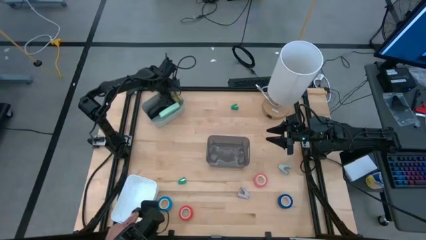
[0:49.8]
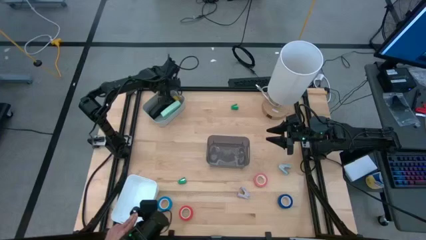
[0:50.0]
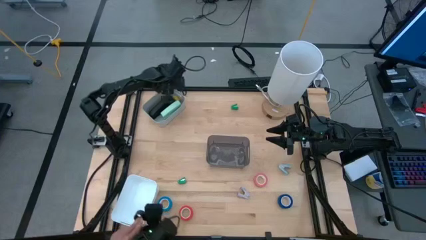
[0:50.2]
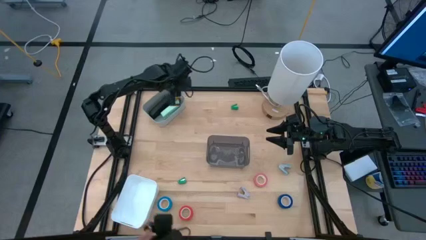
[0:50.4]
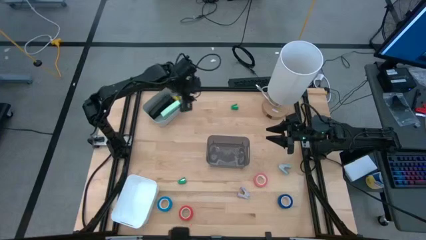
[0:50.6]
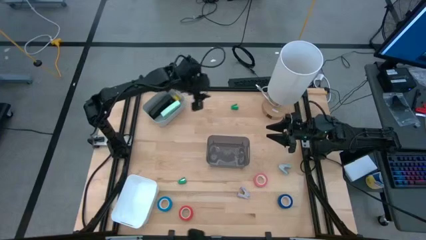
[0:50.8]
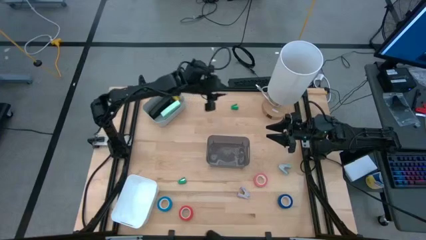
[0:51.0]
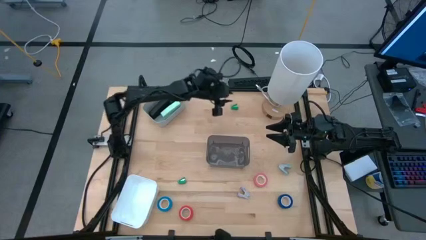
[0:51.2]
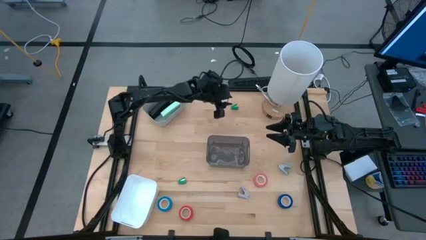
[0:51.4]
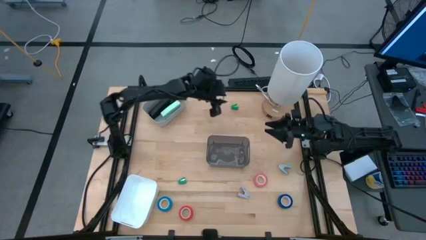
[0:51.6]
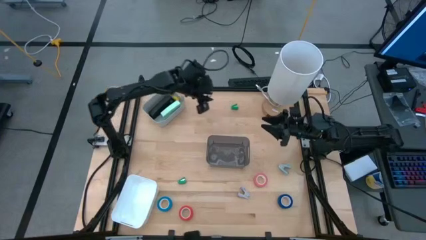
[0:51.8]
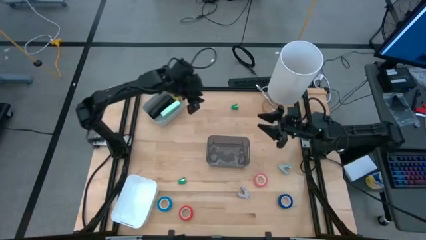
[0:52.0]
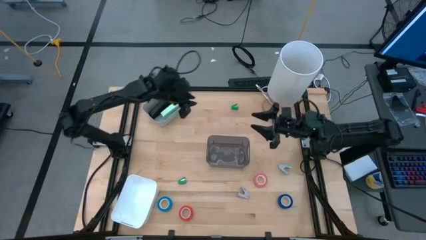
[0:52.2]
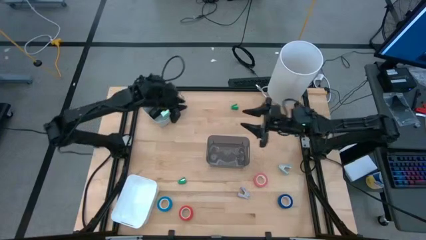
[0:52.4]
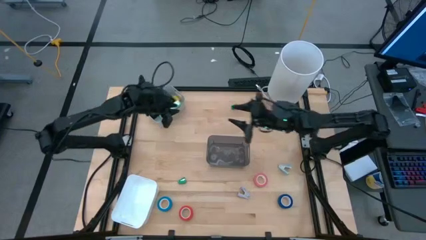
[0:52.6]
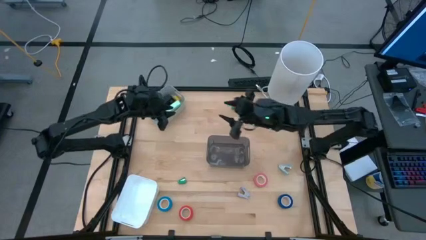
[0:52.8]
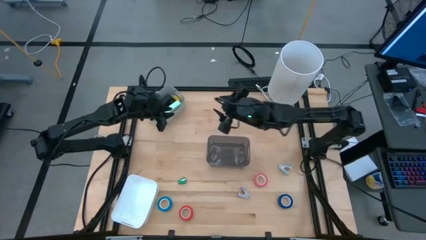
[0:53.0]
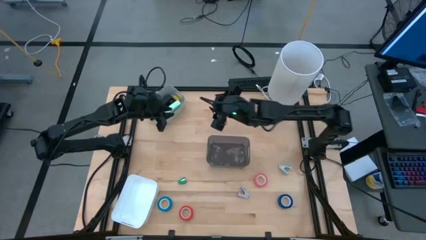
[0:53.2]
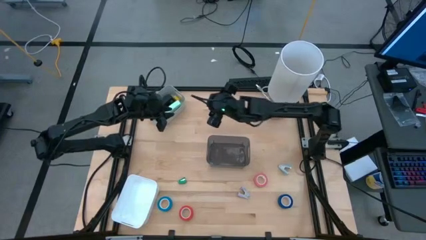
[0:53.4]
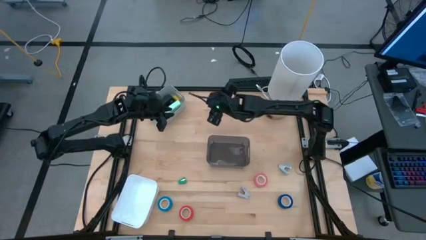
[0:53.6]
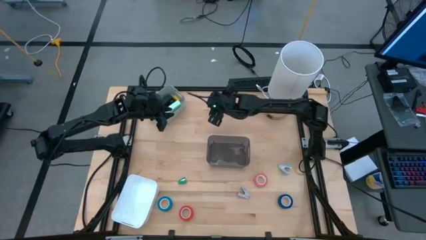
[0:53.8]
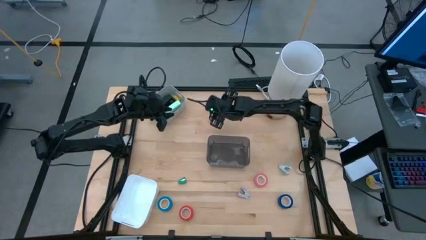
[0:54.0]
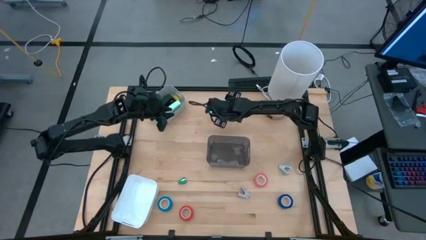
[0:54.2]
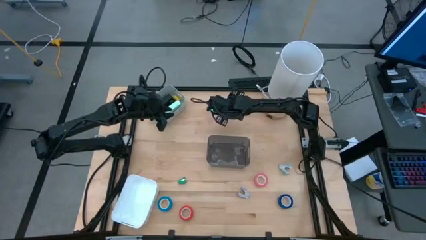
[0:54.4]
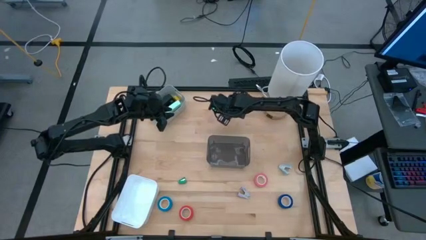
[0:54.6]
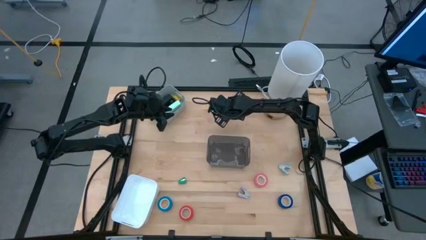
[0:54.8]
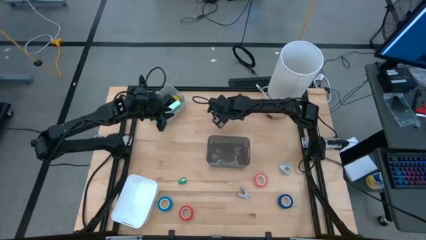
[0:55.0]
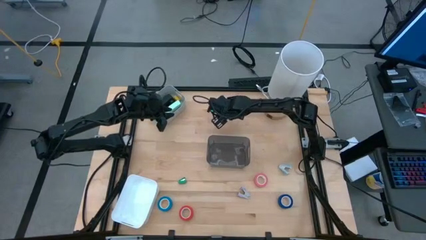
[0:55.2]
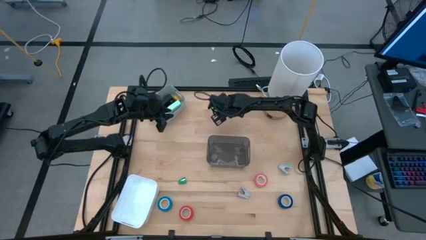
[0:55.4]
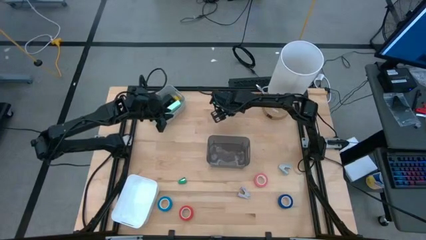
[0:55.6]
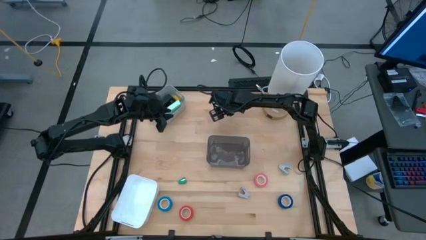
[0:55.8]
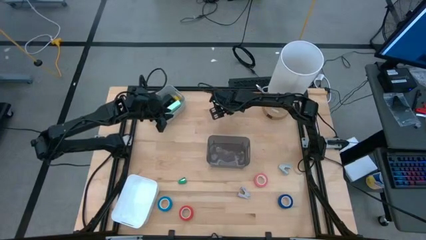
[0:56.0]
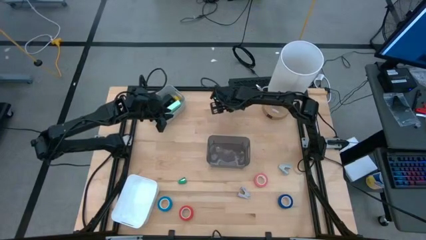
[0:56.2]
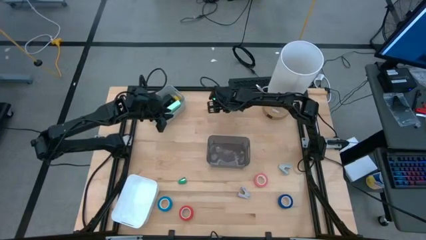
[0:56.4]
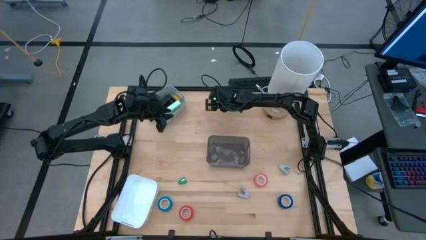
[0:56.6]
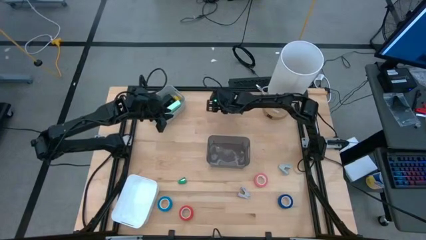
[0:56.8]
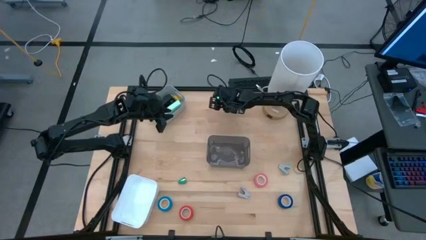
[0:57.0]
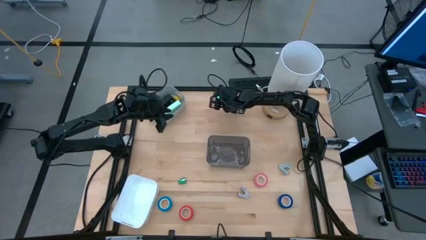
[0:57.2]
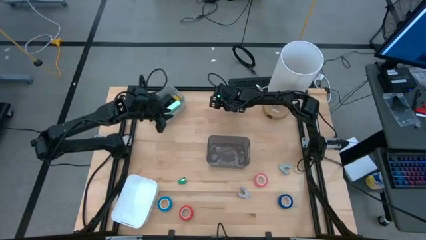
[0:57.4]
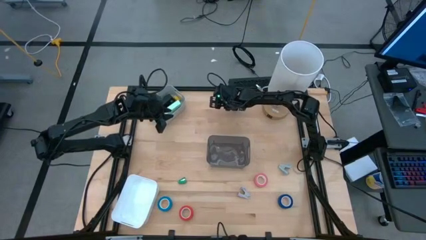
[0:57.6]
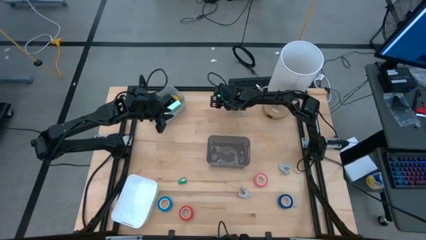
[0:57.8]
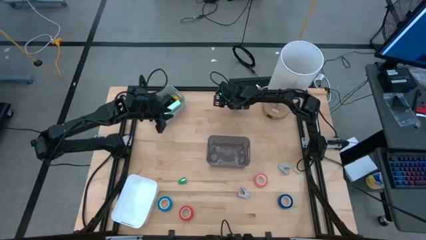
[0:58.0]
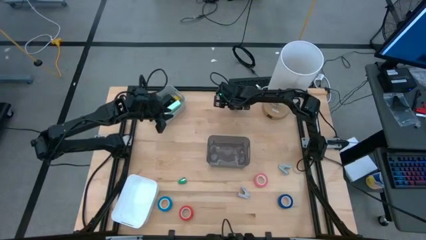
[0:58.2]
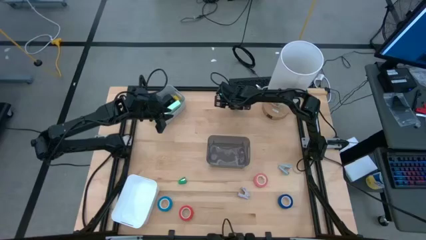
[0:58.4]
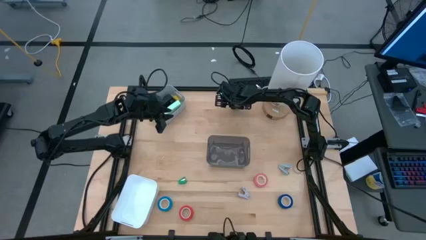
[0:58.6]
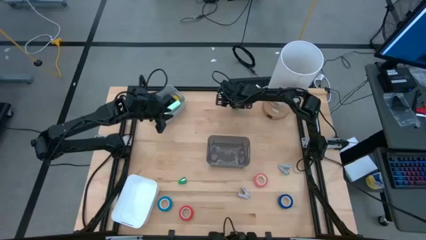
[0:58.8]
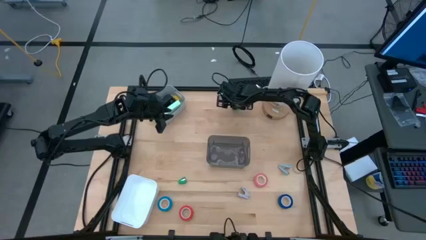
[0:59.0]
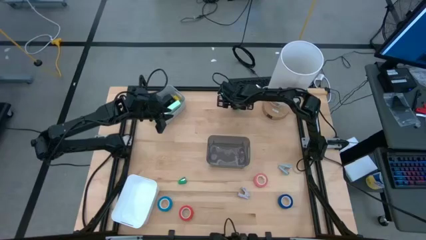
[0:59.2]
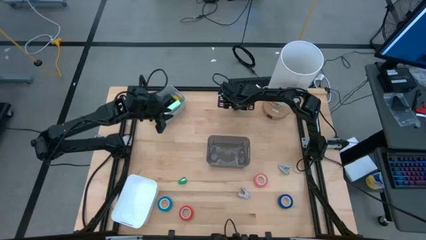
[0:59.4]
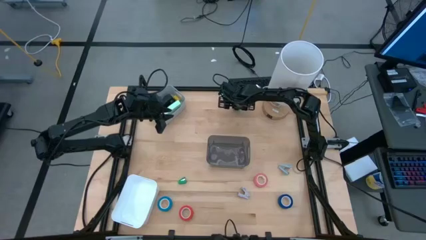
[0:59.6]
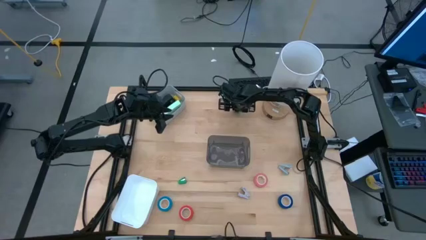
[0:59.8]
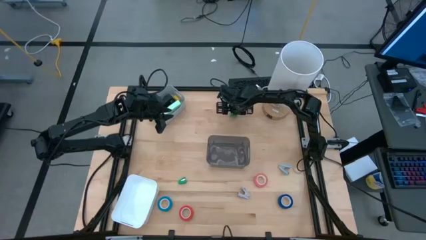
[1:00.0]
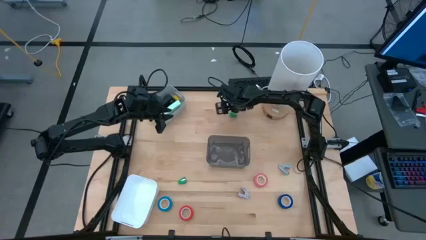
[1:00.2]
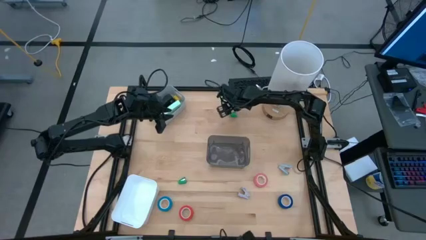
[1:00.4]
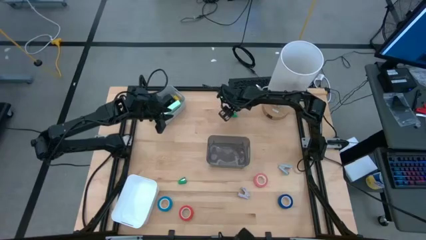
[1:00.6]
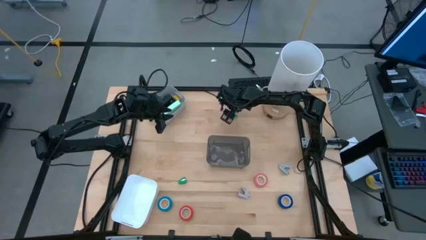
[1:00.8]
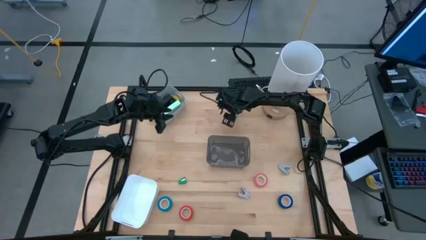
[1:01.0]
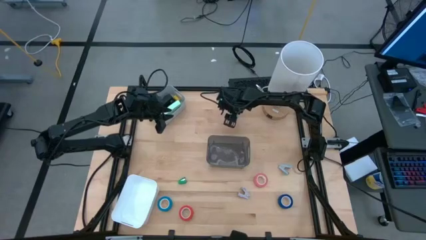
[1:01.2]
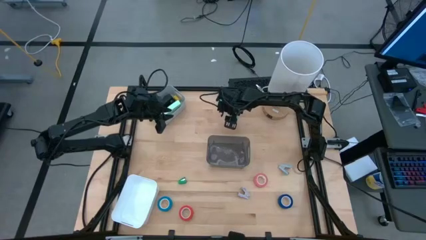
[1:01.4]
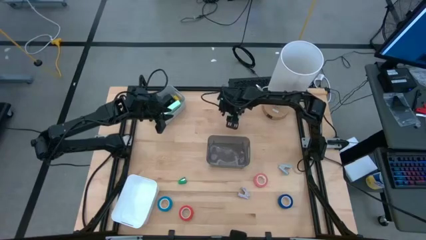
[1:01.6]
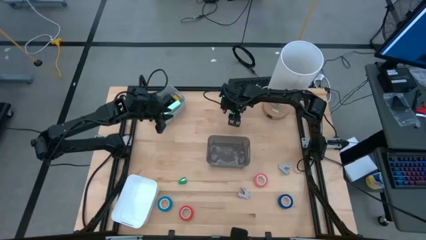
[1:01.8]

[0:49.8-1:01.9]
Task: Pick and place Stapler, Stapler remover, tape
Put the top green stapler into the gray bin

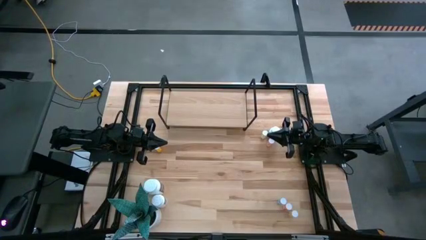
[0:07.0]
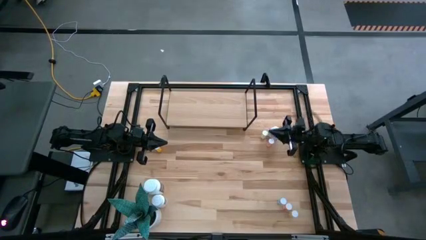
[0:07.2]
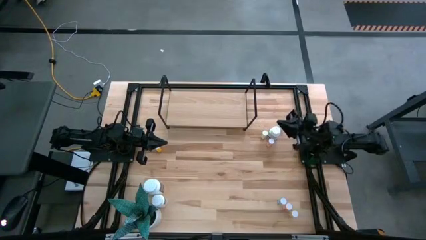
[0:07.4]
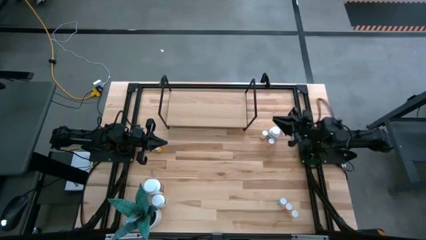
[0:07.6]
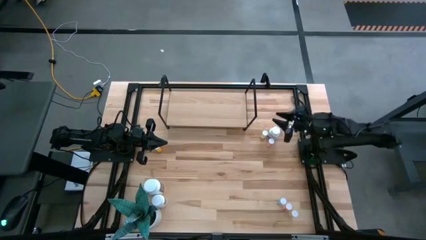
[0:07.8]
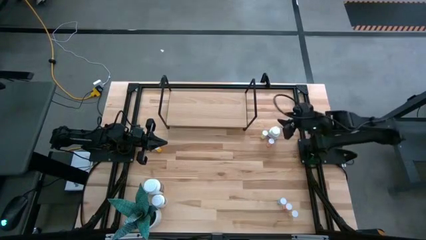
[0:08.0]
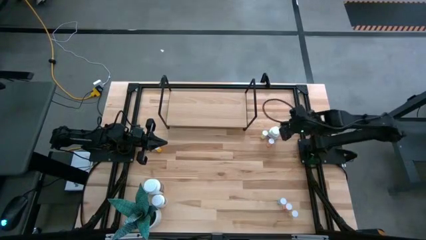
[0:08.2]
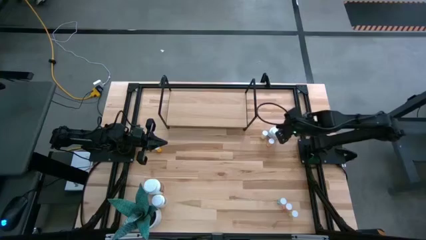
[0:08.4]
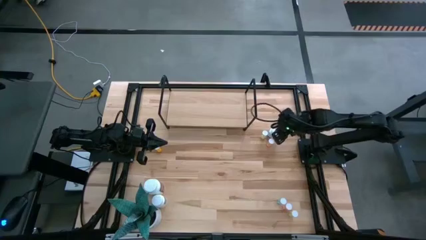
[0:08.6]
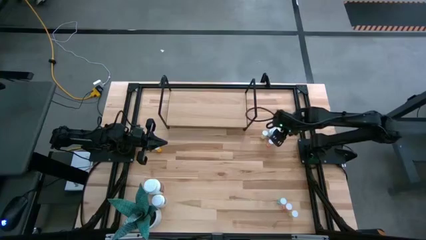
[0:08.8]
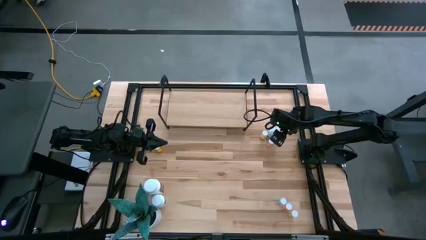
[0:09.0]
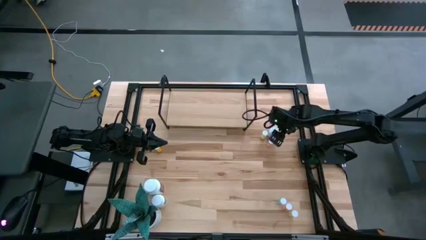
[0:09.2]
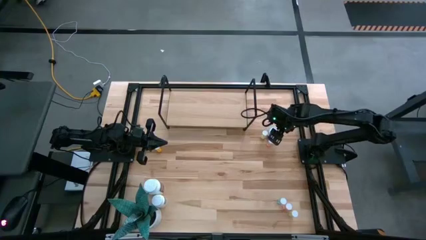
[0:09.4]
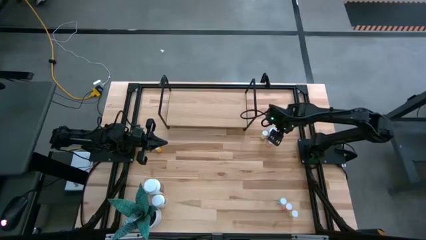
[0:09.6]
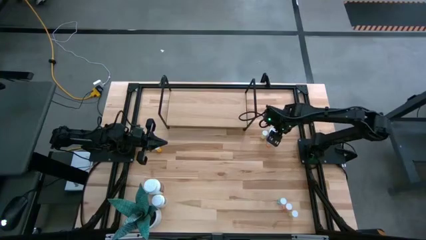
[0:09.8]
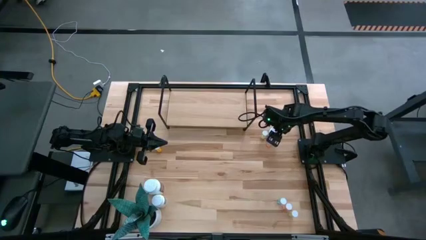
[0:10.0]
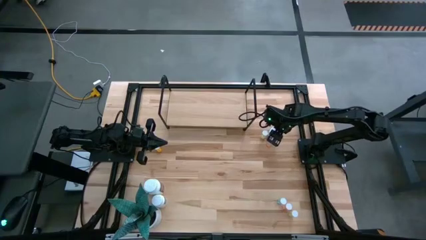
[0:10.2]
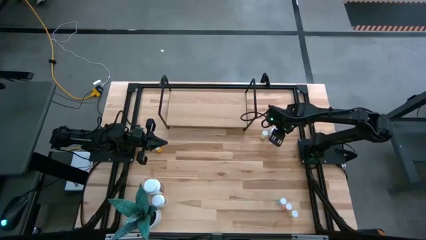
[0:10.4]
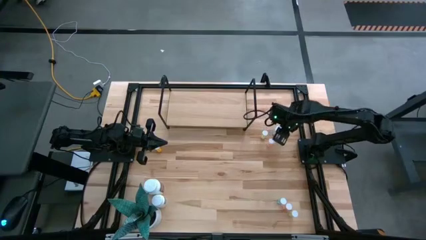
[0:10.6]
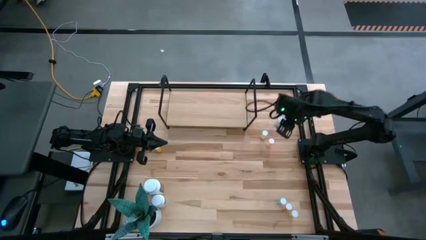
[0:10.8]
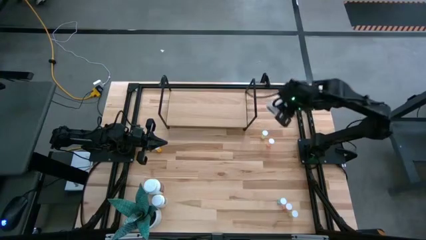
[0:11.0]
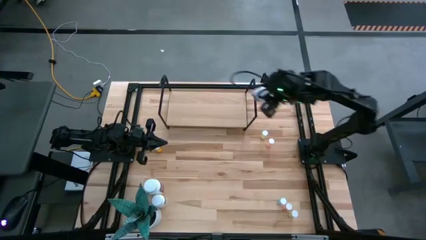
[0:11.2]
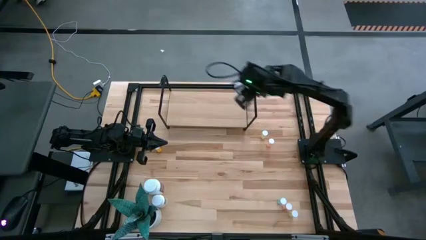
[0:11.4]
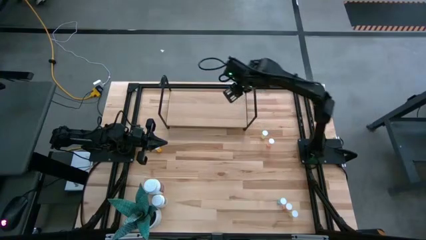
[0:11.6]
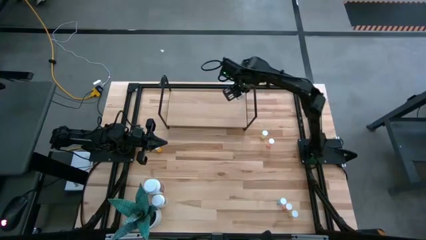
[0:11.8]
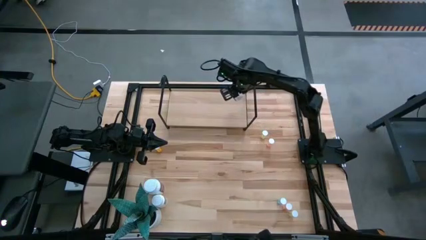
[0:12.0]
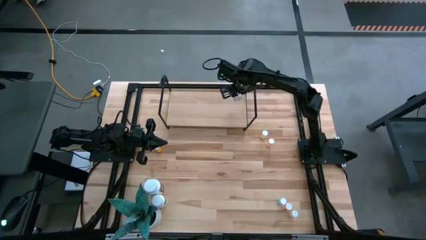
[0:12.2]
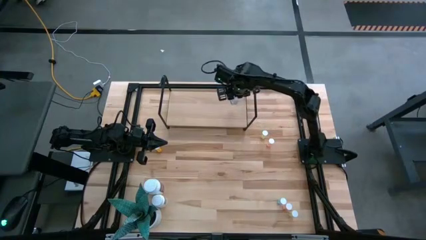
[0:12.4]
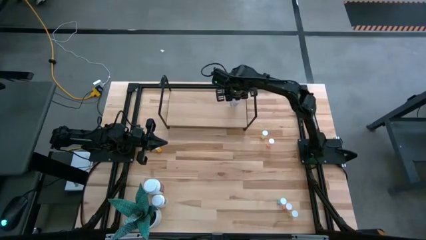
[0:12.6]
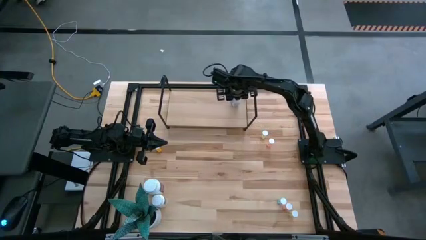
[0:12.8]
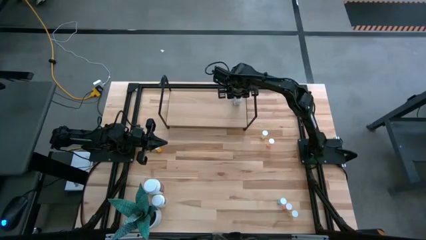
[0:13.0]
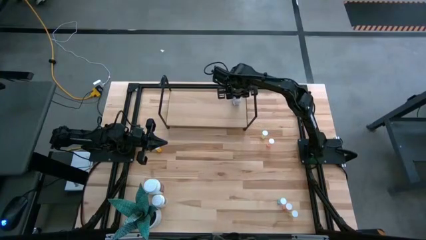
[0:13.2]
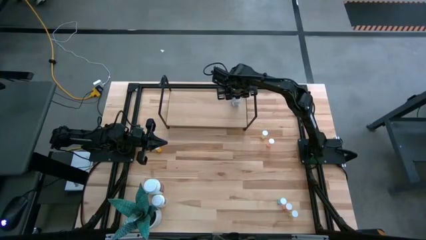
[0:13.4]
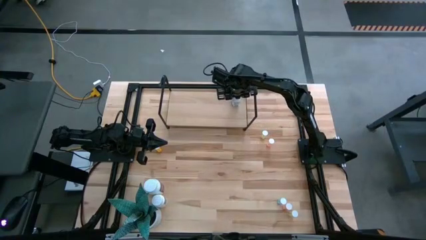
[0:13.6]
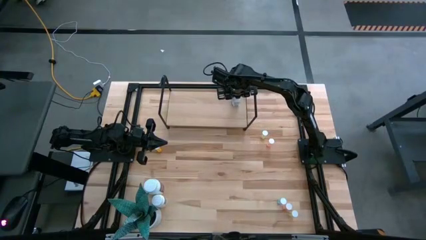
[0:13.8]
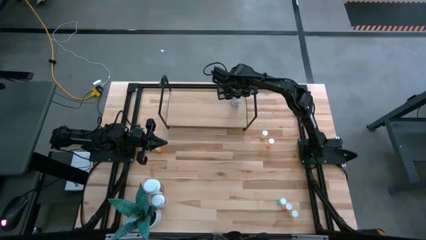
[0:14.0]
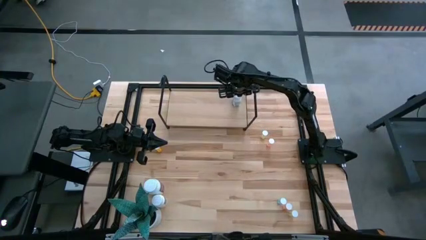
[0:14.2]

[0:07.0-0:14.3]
Task: Pick and place medicine bottles onto shelf by color
Put the white and blue pill bottle on the shelf
